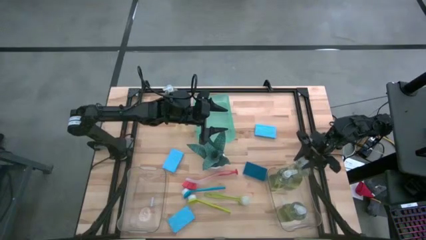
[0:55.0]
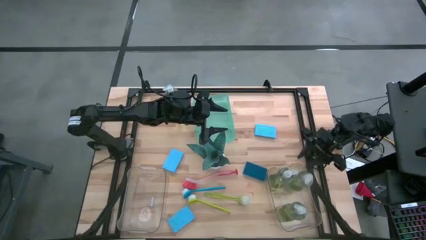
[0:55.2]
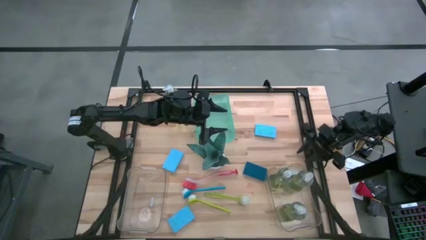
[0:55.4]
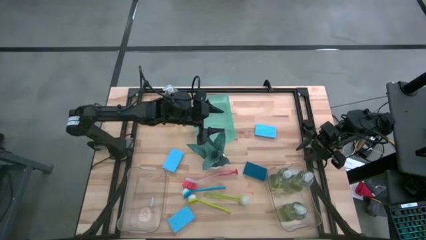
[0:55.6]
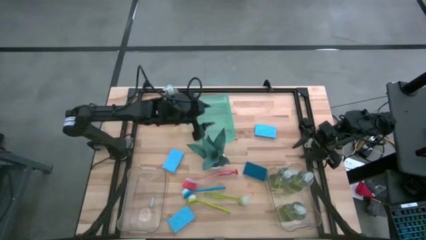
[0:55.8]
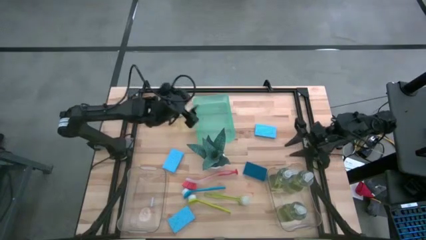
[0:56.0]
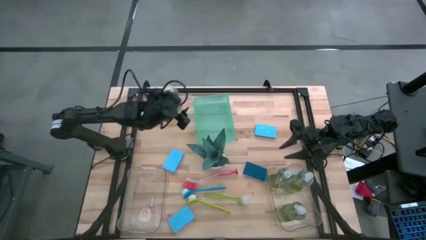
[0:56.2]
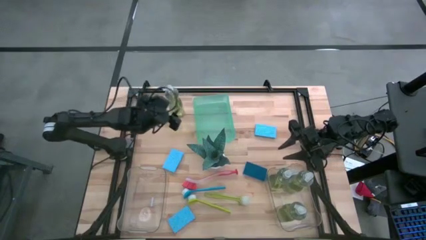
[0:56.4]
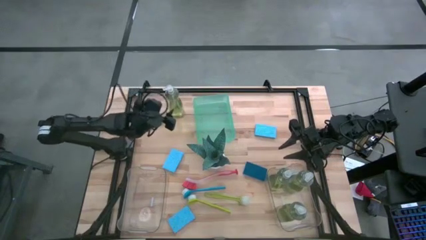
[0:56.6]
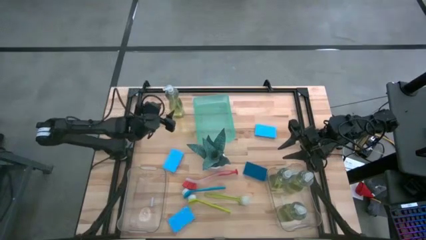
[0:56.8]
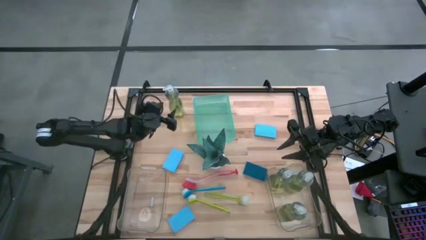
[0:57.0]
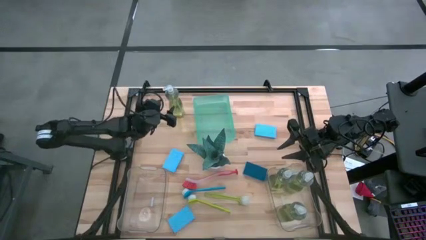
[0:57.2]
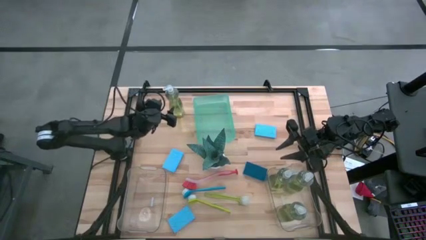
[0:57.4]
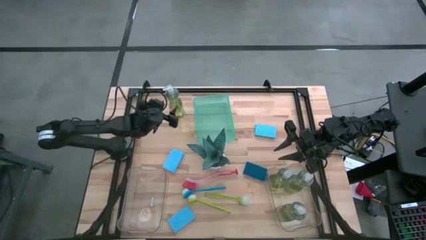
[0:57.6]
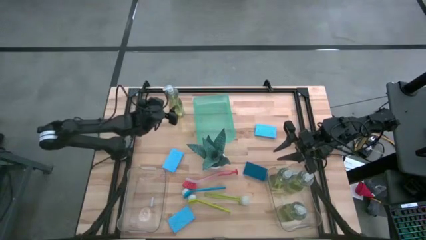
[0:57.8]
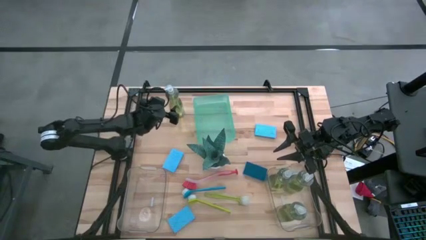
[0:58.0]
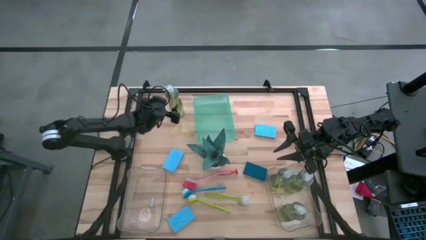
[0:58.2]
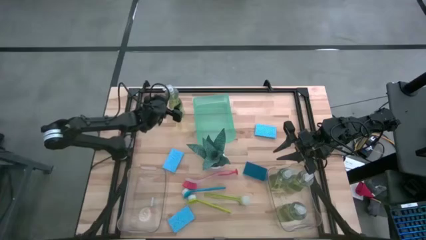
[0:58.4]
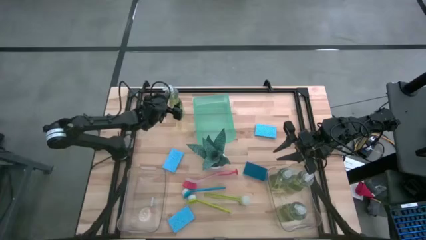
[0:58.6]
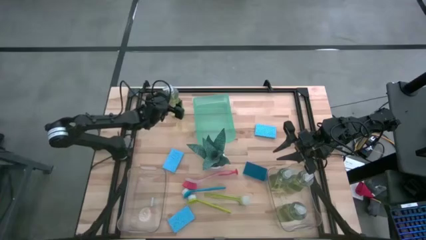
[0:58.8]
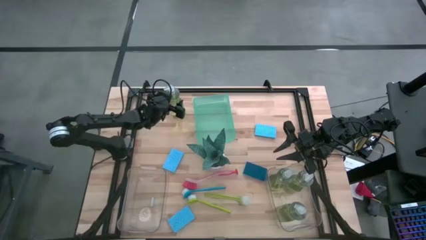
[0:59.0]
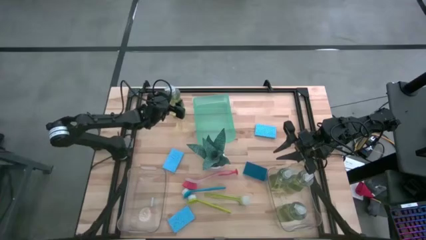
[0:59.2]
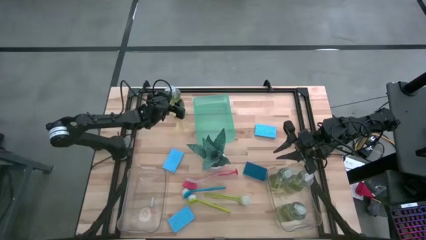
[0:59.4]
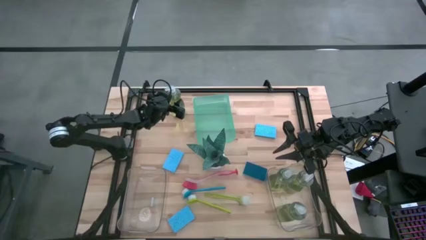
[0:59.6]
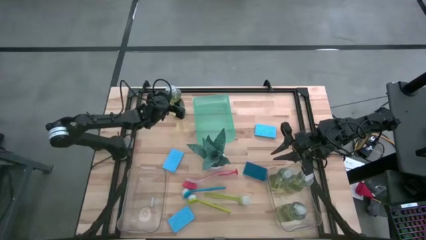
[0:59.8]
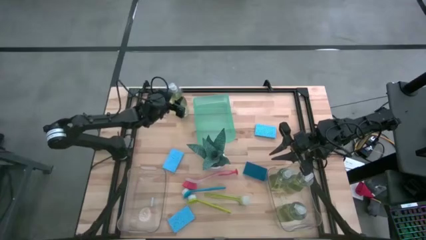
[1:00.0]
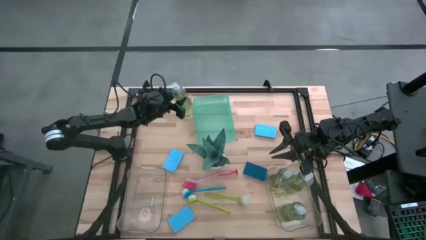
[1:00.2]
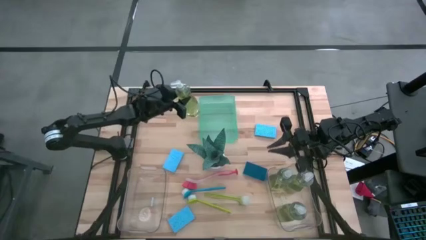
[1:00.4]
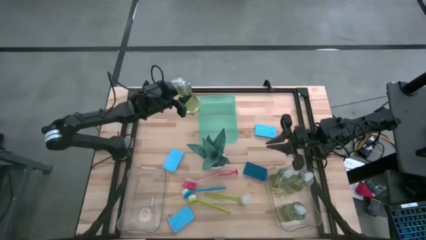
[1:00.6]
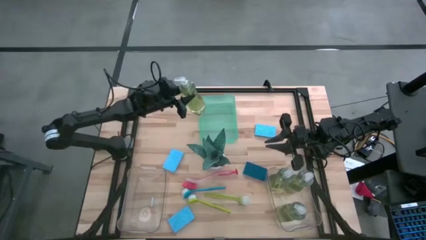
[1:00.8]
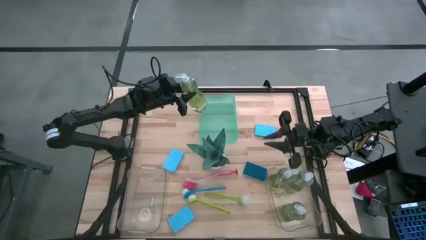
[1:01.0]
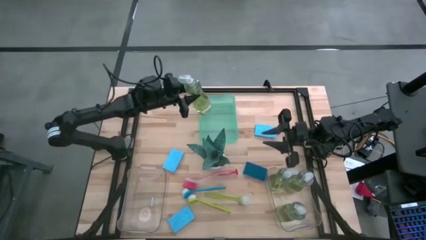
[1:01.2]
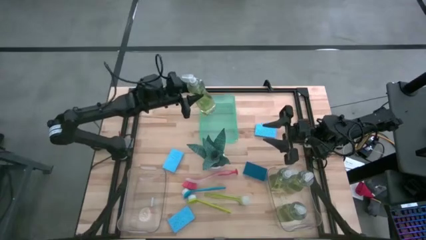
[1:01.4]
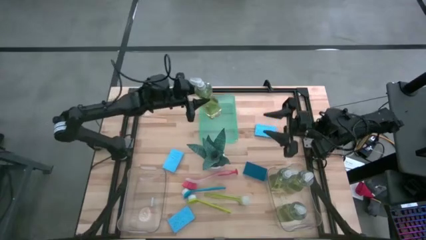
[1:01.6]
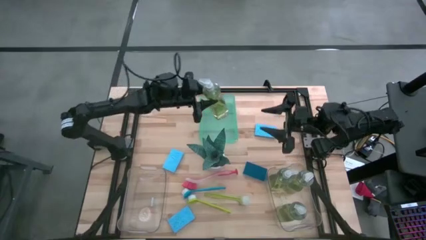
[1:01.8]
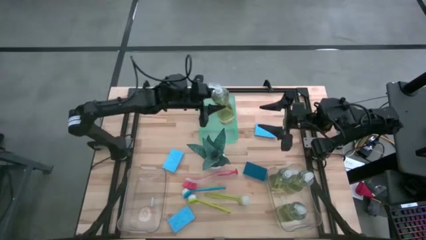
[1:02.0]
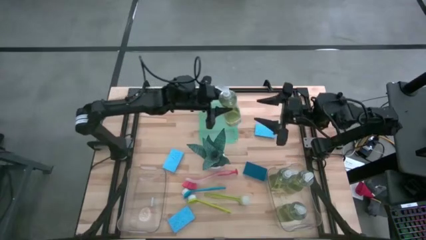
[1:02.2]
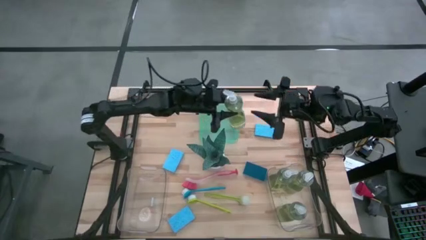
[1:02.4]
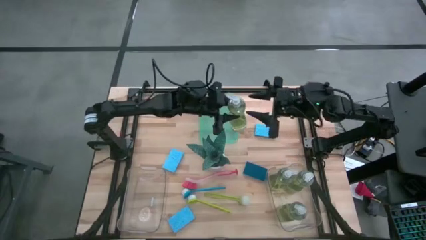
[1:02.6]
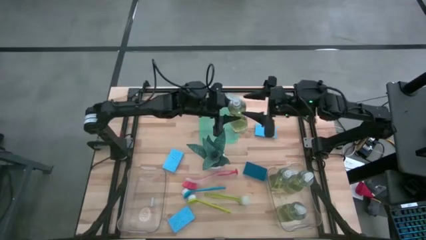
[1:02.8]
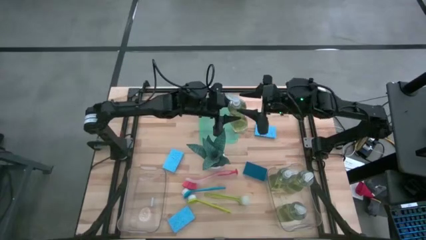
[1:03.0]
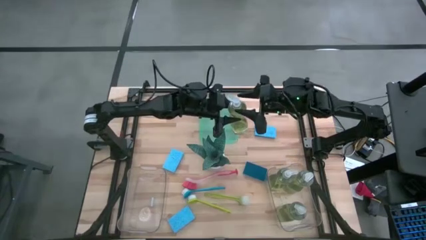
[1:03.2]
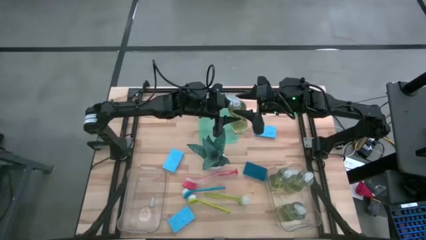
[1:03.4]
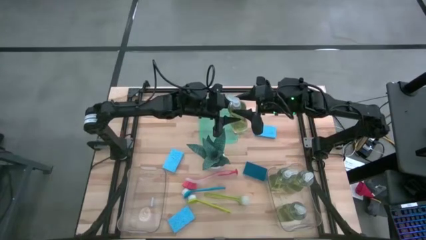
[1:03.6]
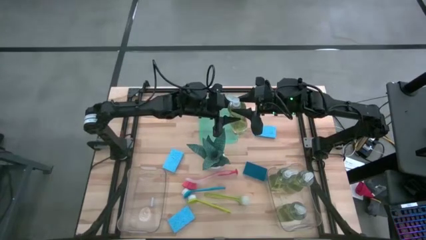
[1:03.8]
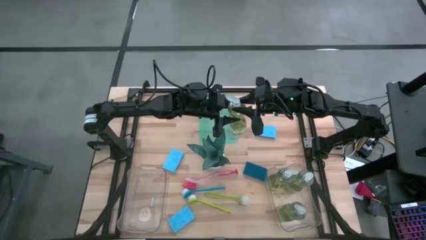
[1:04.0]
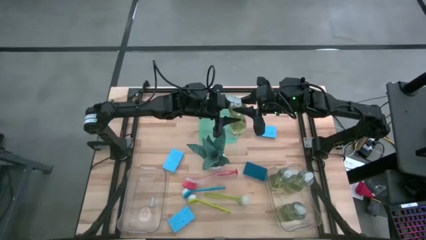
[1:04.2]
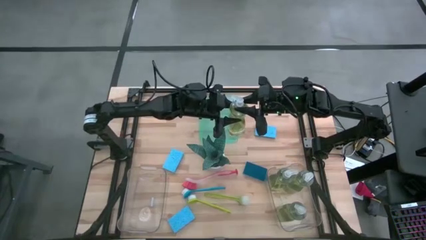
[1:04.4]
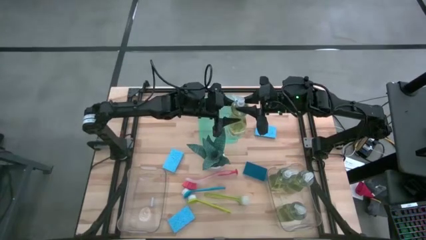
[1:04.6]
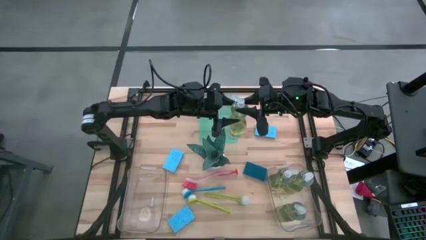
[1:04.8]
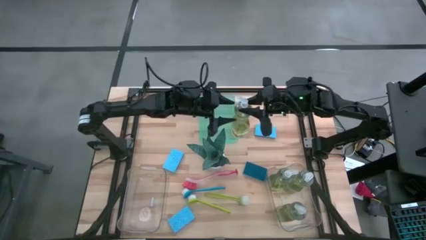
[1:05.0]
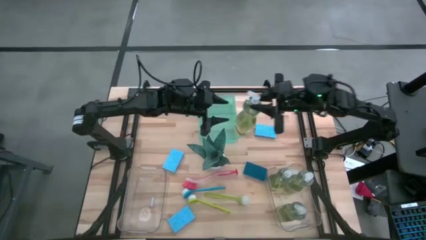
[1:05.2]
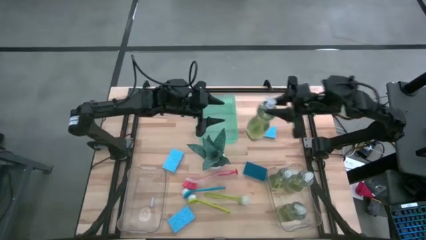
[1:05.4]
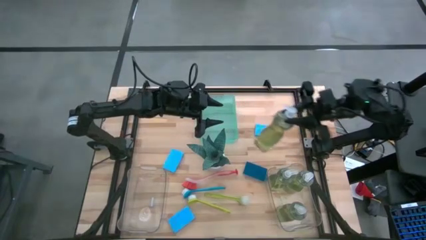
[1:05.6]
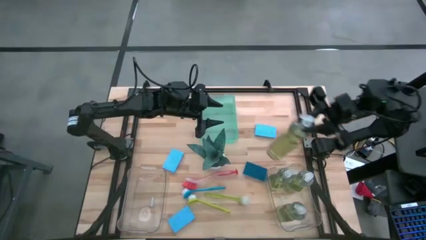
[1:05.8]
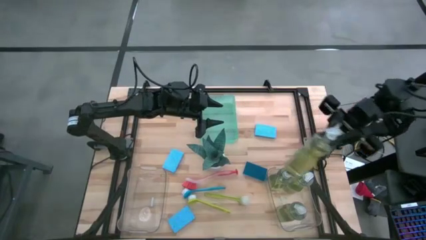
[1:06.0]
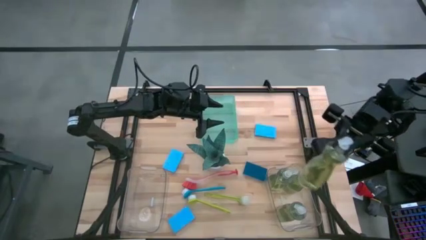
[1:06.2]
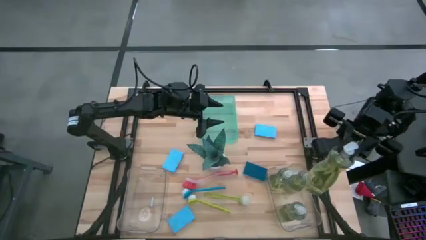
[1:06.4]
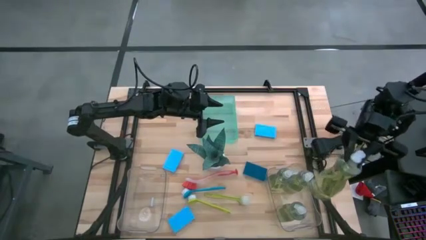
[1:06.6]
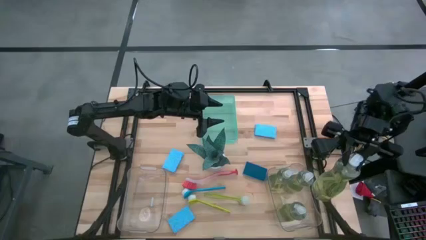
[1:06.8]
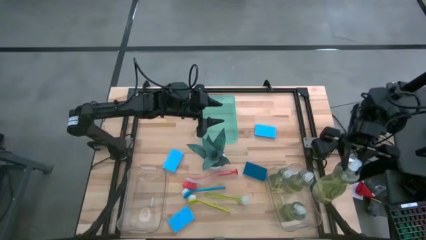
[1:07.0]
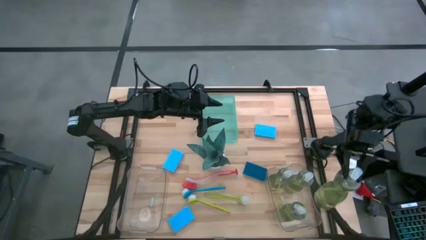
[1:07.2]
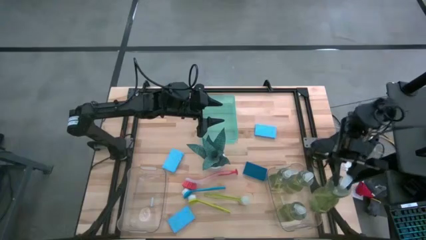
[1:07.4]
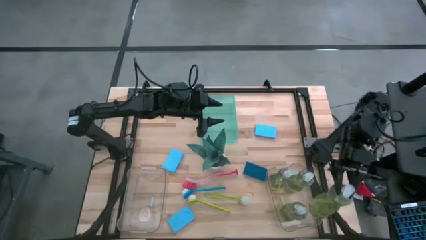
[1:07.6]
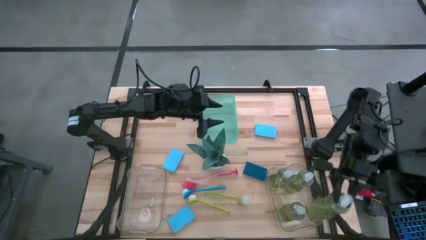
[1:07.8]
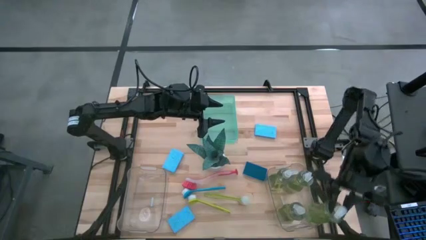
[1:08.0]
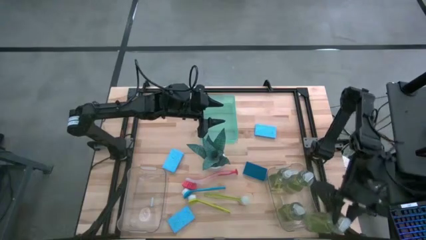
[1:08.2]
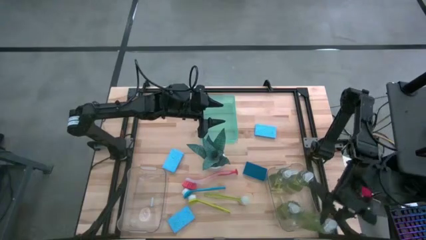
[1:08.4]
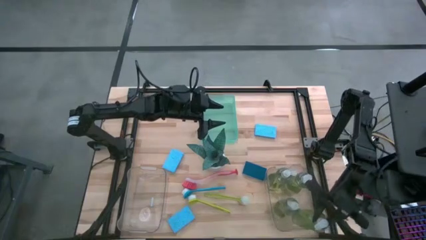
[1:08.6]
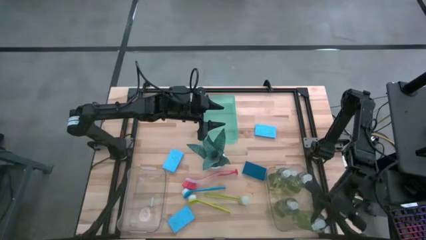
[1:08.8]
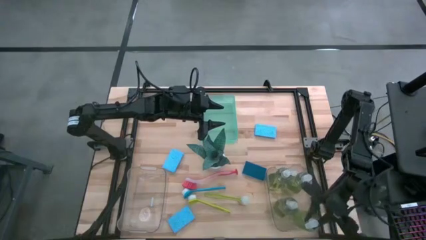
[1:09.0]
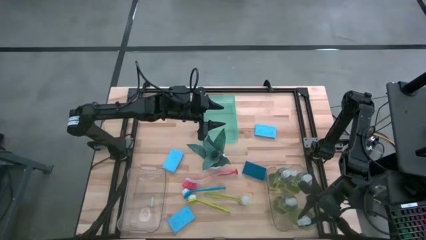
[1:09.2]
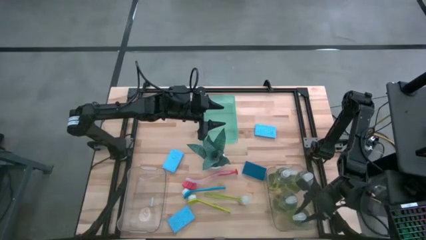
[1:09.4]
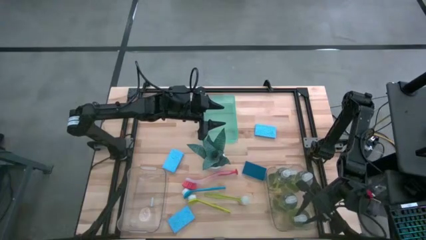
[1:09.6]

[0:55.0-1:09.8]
Task: Pick & Place Kitchen Sink Supplies
Put the yellow soap dispenser into the right transparent bin
